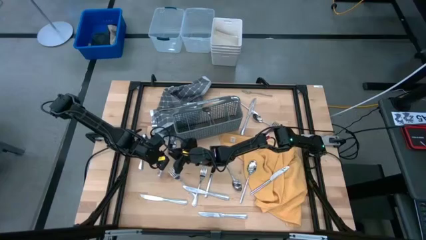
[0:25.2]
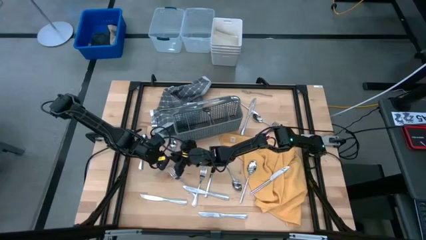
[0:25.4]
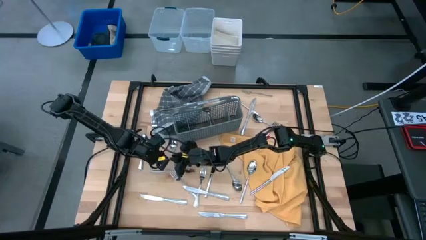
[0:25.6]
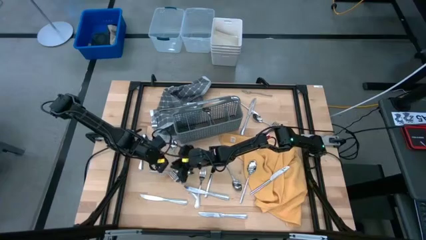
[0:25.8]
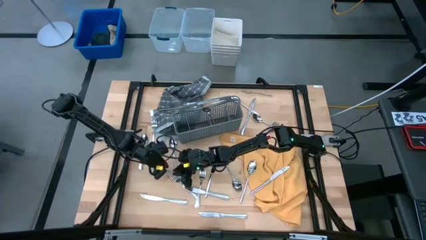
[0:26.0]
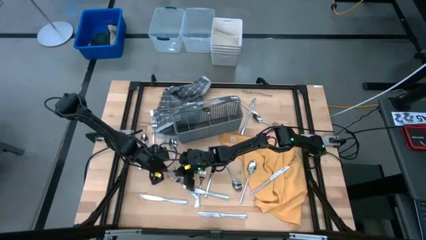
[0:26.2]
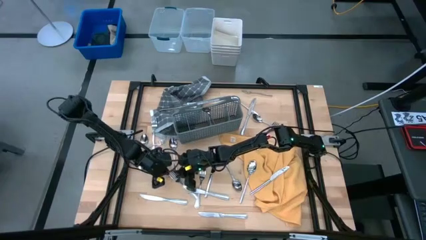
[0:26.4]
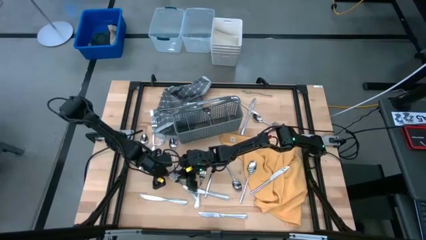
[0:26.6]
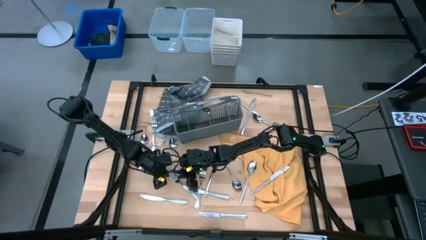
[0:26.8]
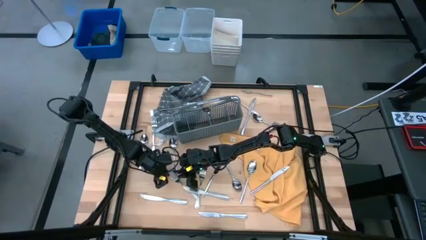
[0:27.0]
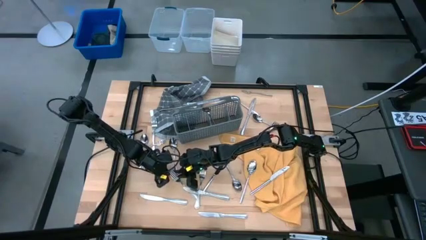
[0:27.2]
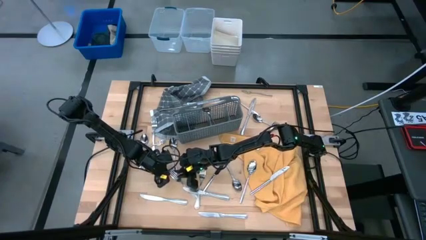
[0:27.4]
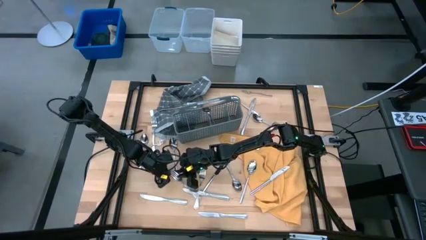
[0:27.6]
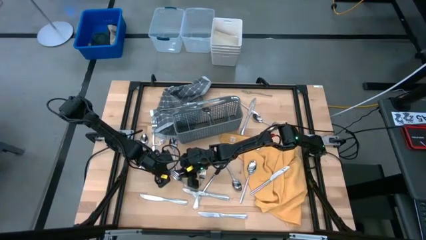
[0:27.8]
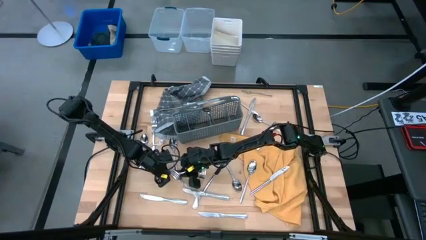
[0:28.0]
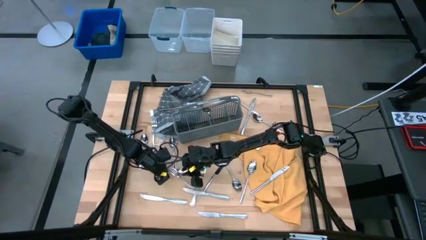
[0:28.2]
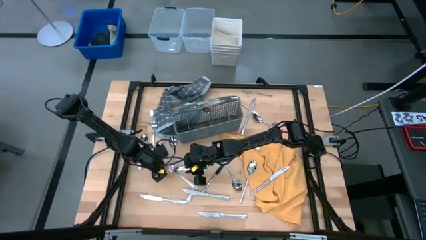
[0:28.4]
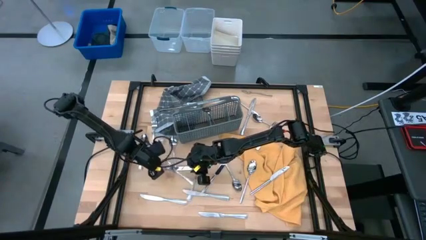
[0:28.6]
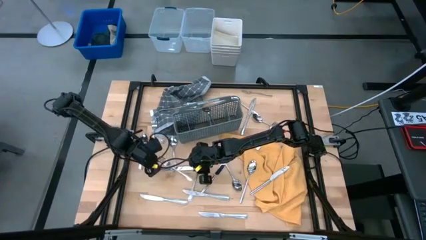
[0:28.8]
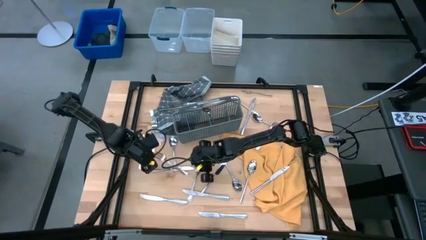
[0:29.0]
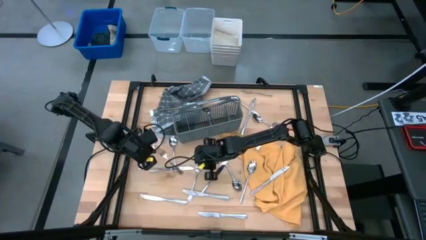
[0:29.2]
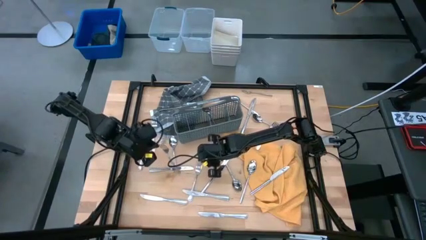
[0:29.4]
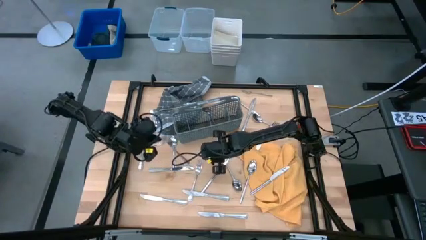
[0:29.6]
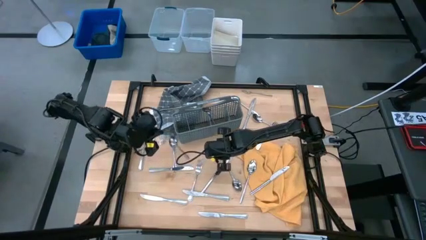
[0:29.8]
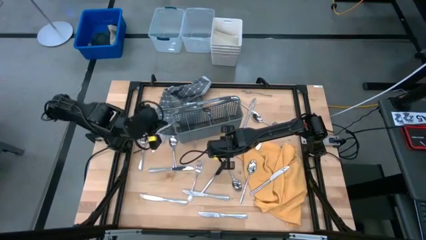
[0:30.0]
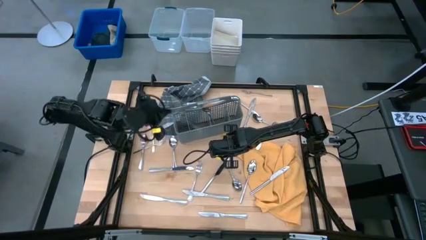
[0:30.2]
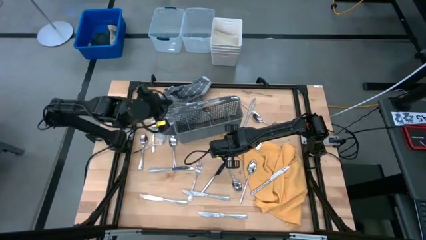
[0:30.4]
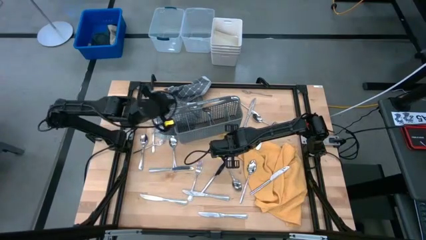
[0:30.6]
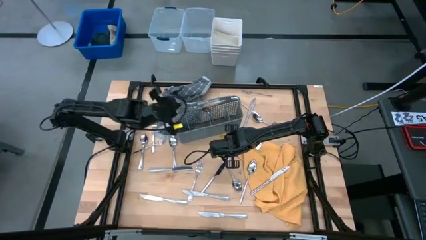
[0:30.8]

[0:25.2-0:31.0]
Task: Sort silverware
Put the silver fork into the gray silverware basket

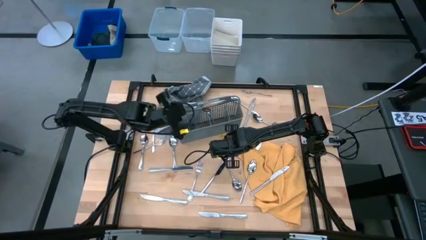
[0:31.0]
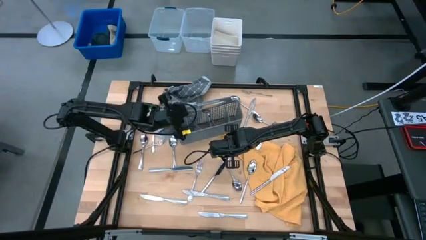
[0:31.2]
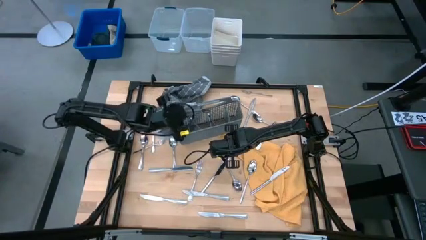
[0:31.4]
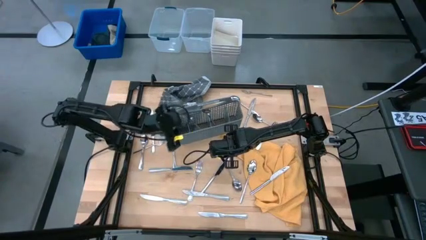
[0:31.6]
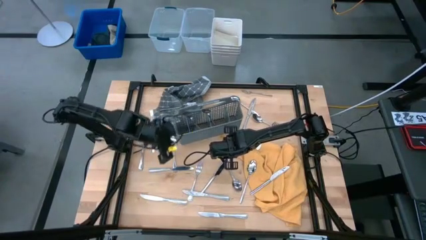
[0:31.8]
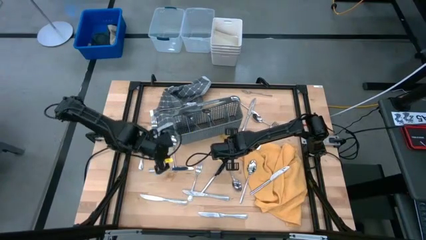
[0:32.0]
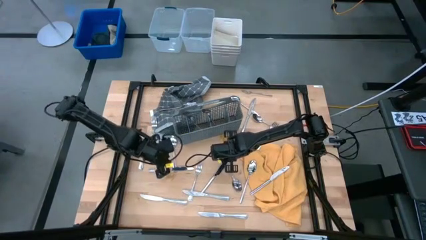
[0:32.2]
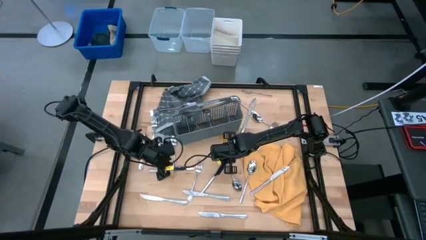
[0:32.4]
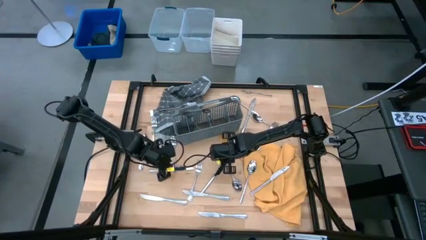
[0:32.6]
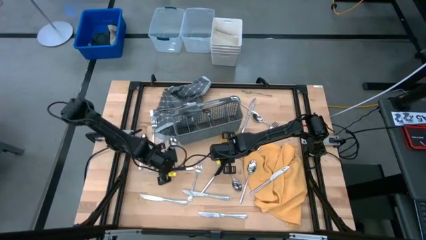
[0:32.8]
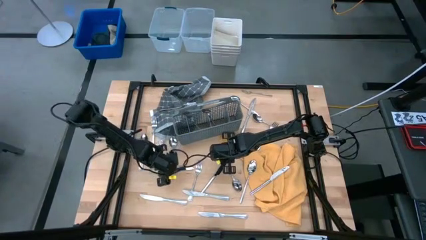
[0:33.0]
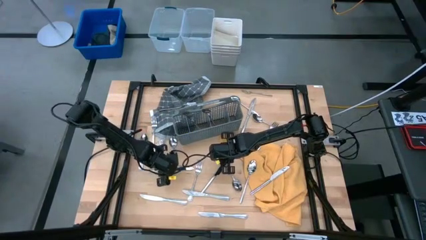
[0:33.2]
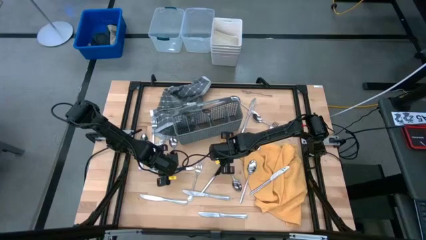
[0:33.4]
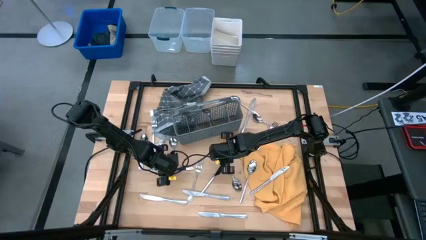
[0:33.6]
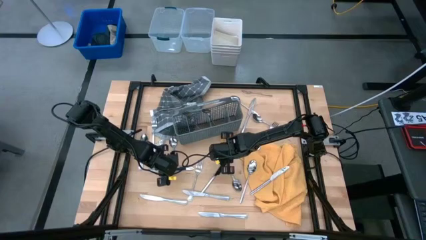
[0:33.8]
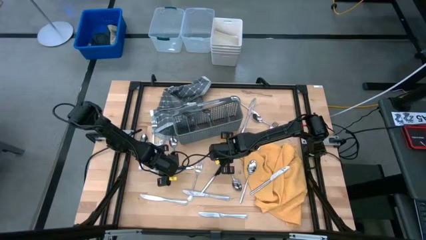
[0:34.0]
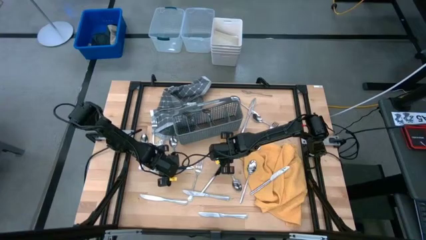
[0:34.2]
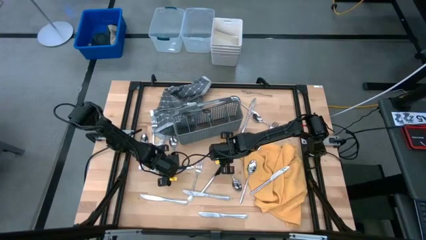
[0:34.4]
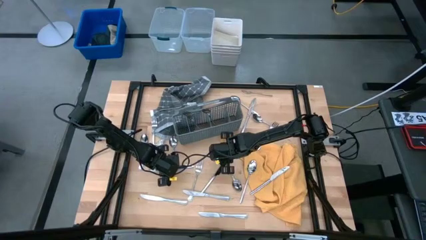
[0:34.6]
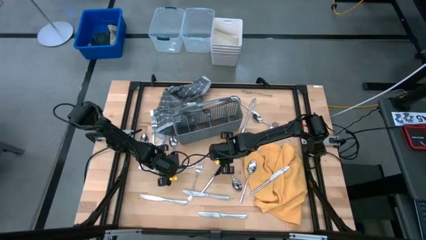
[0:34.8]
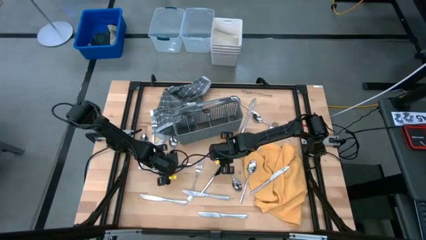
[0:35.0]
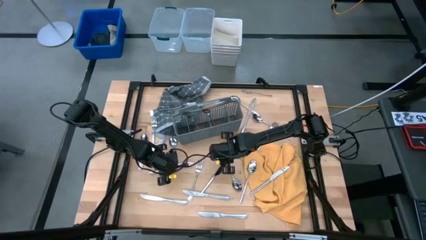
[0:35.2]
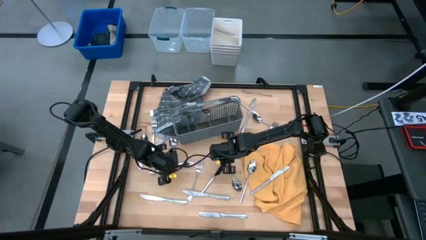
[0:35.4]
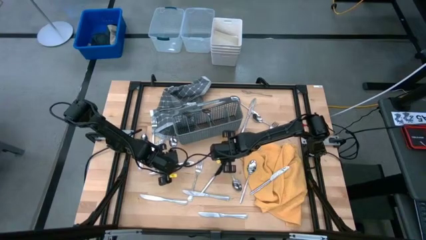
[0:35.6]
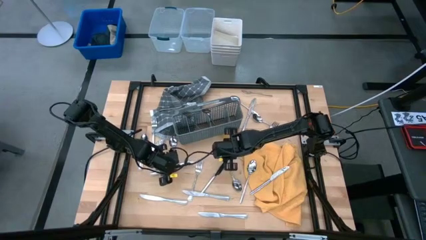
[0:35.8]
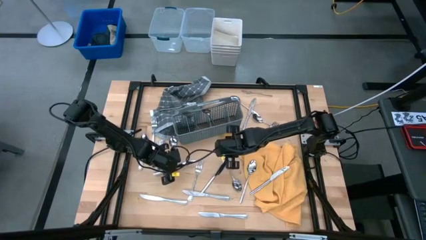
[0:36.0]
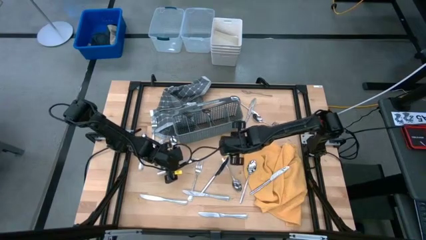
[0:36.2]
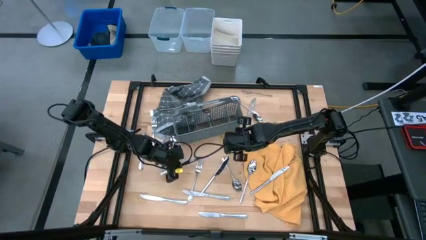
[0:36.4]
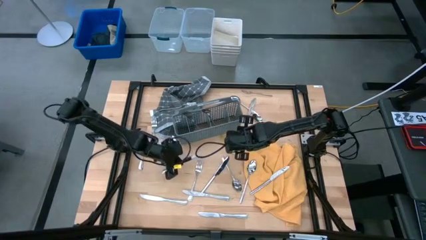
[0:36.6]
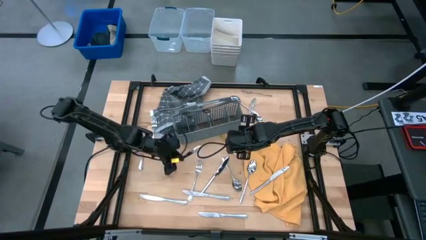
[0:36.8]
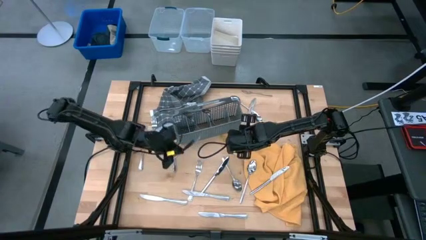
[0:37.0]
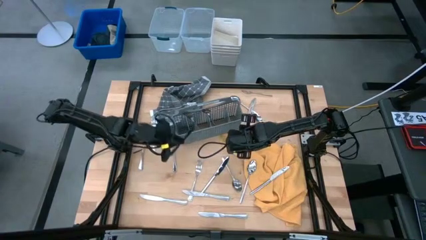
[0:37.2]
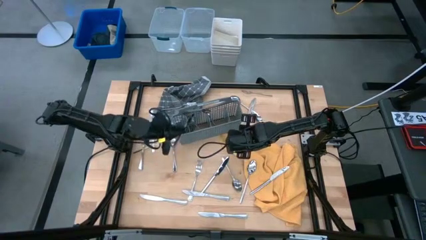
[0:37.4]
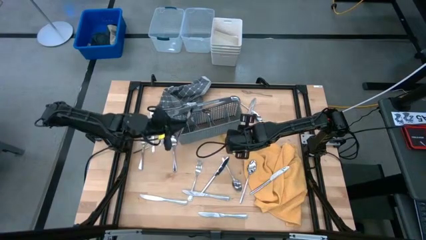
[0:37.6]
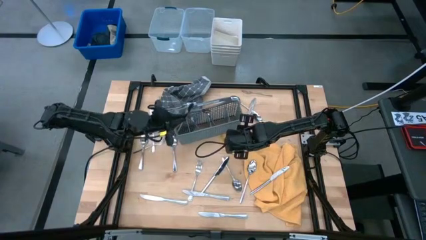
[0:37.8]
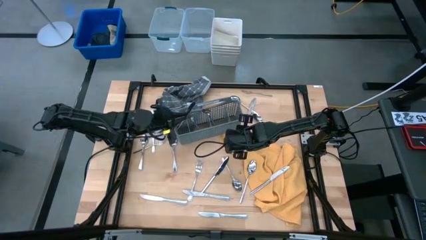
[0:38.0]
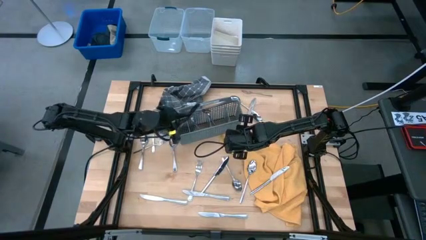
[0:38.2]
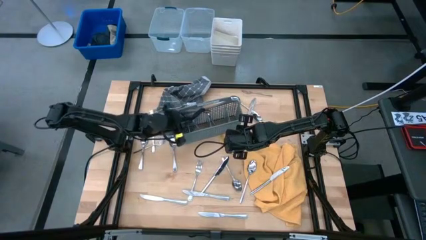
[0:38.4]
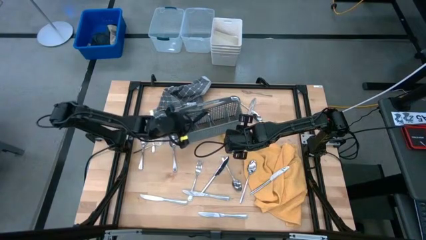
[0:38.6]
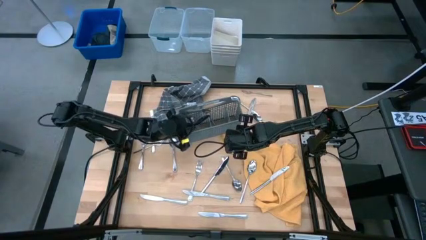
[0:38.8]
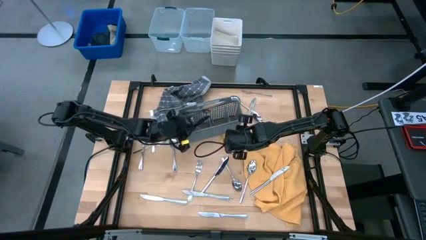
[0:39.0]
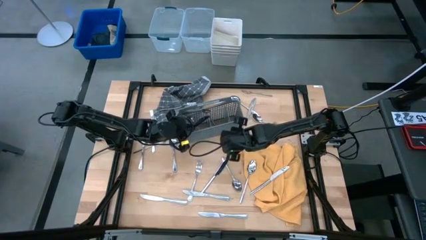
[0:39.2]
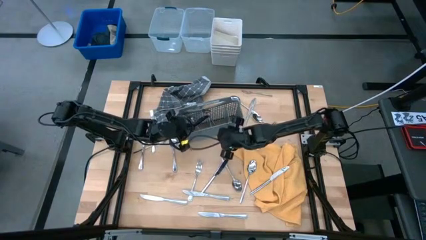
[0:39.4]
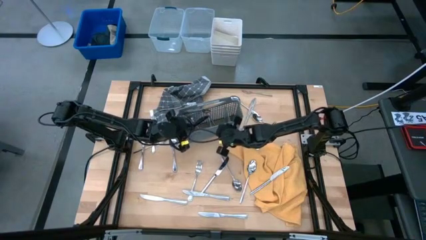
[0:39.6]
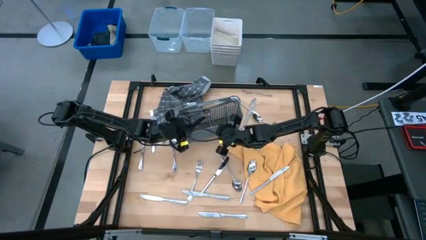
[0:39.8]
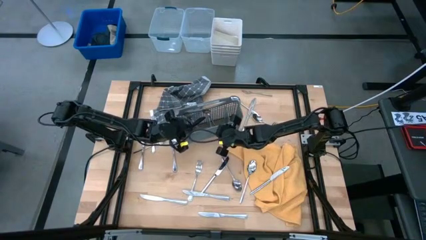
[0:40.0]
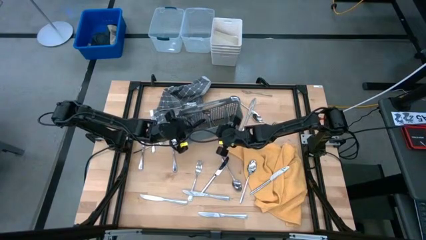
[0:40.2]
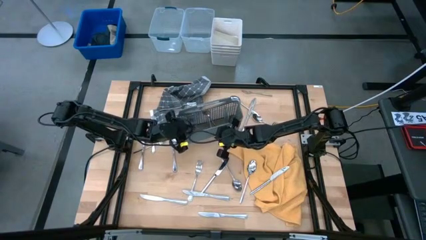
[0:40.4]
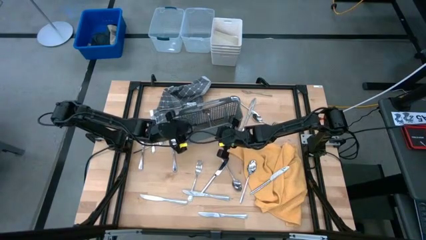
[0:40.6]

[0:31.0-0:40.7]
Put the silver knife into the gray silverware basket
